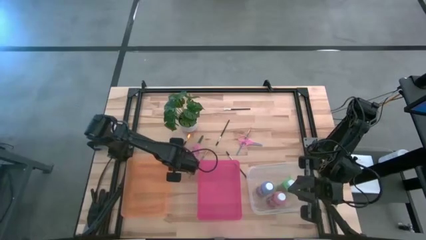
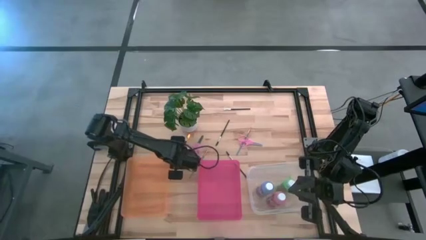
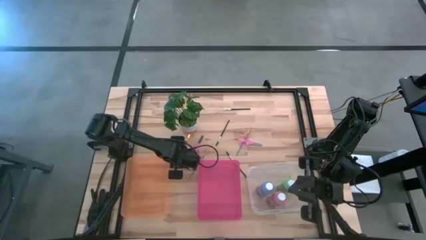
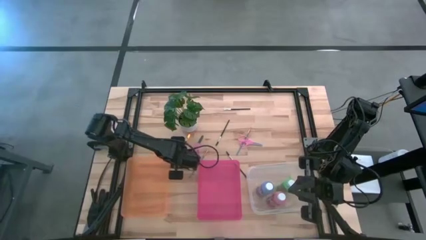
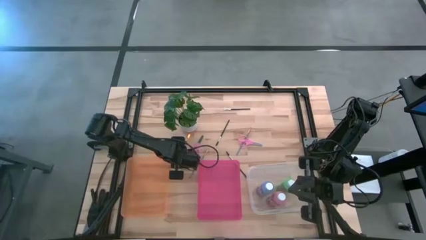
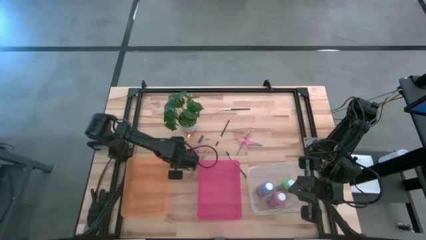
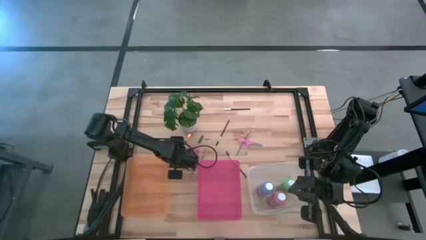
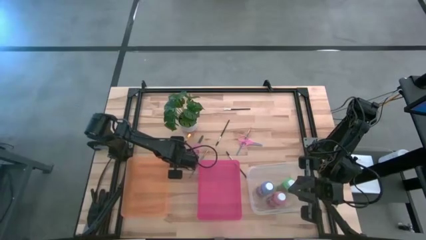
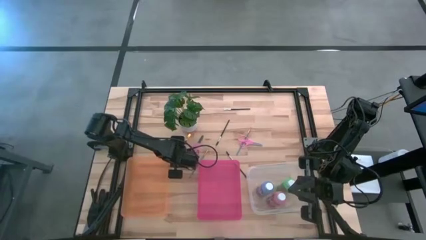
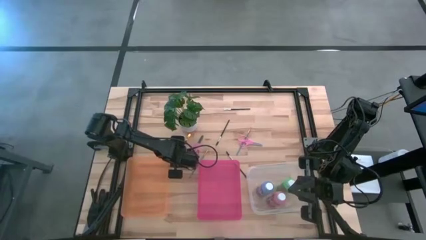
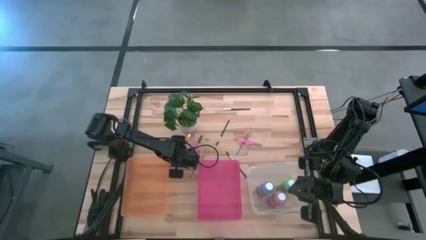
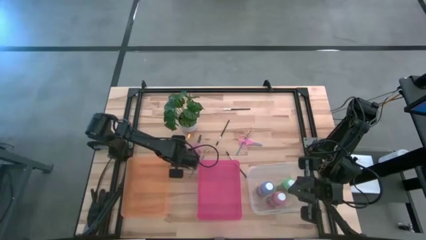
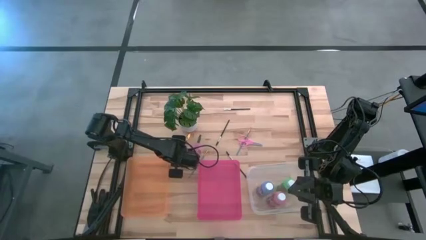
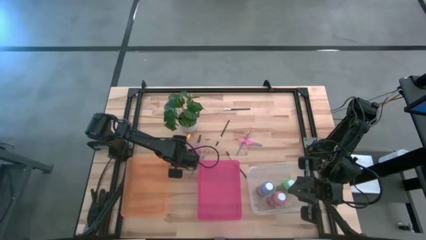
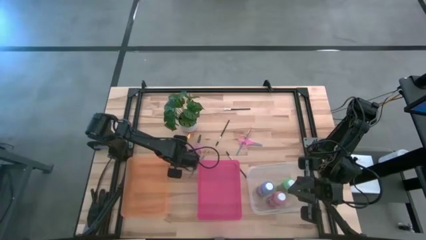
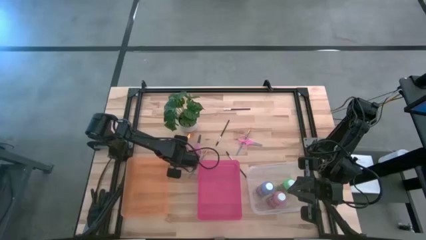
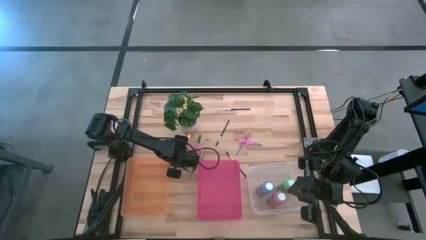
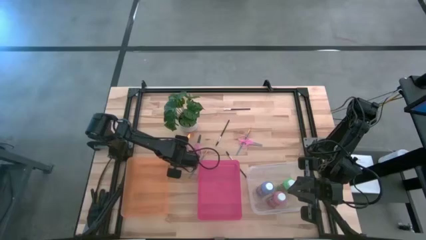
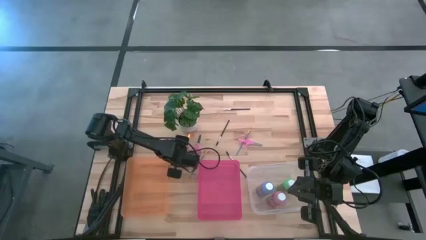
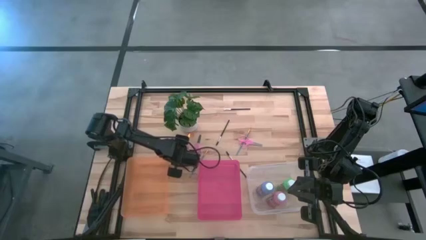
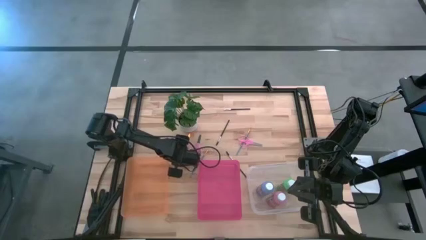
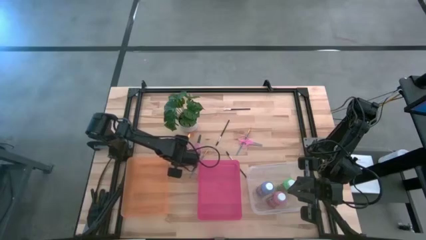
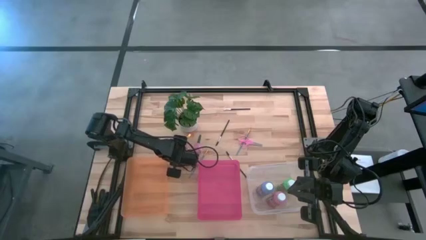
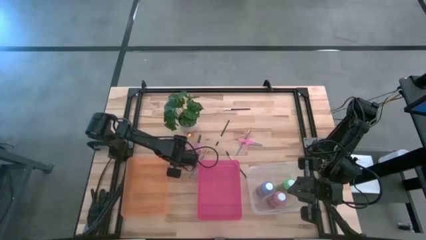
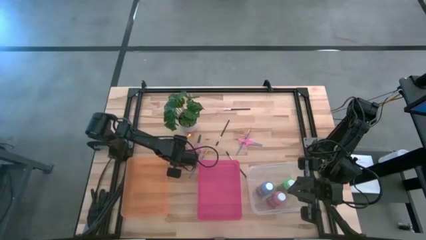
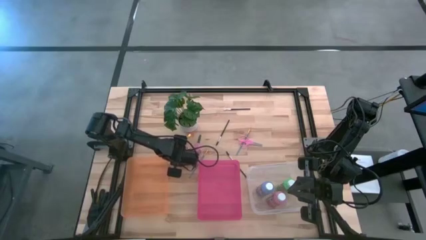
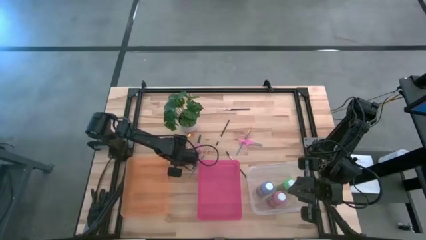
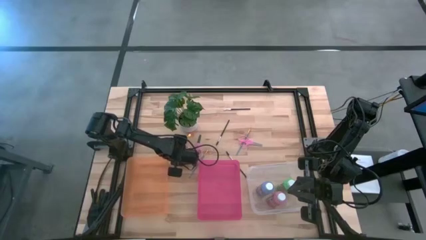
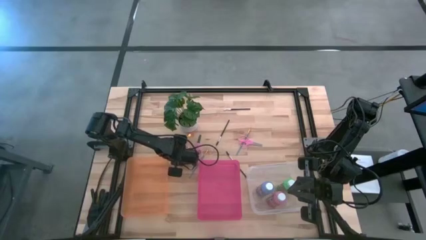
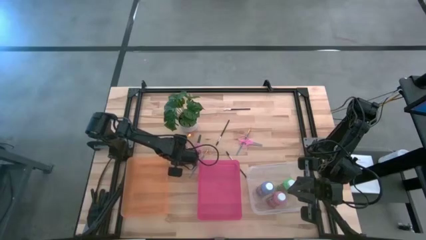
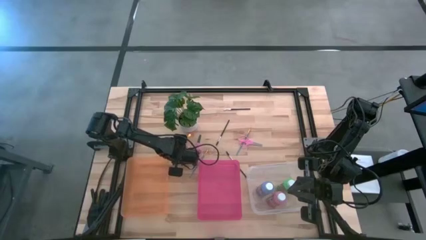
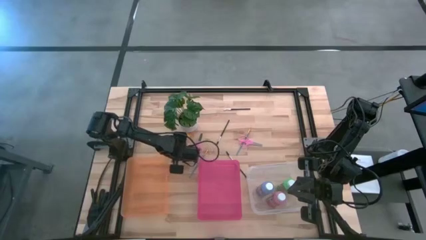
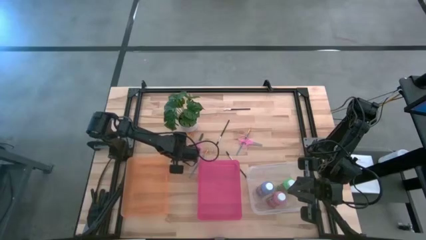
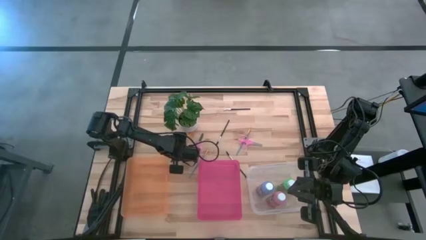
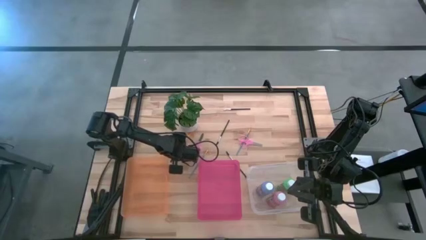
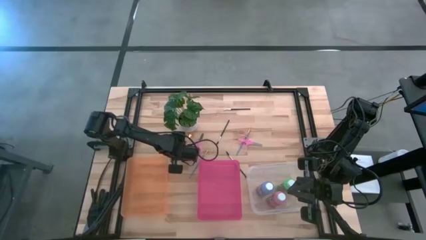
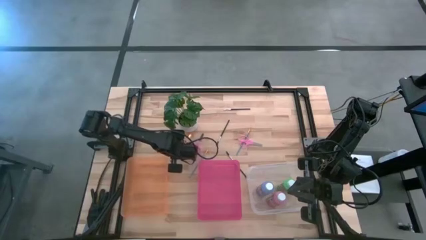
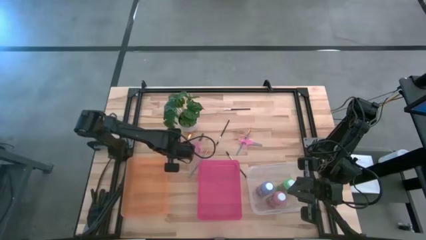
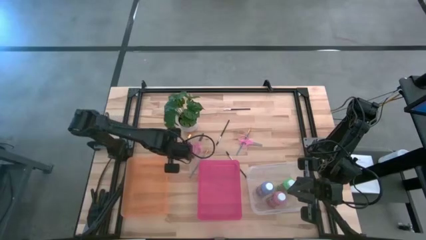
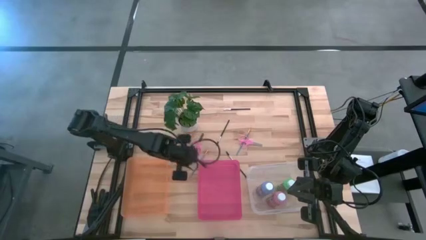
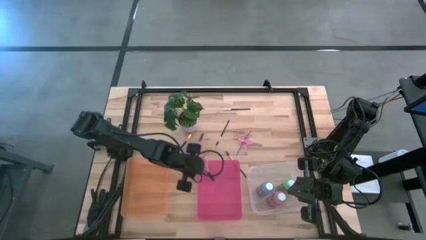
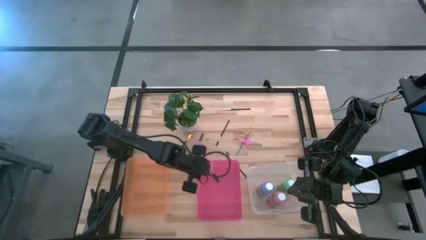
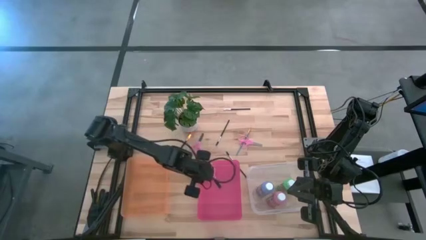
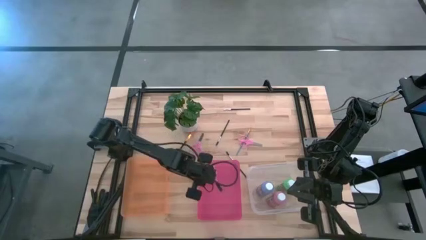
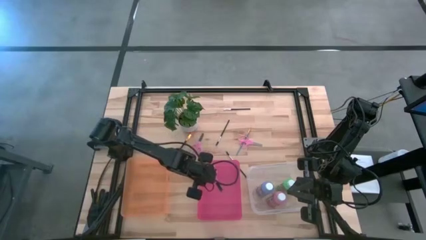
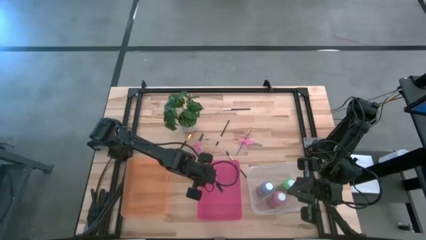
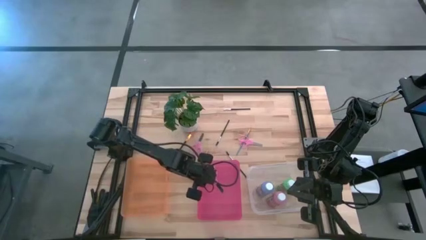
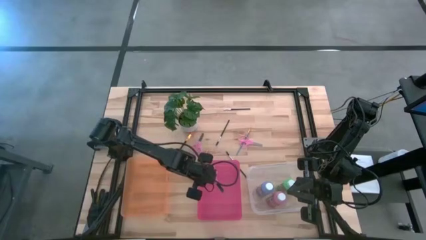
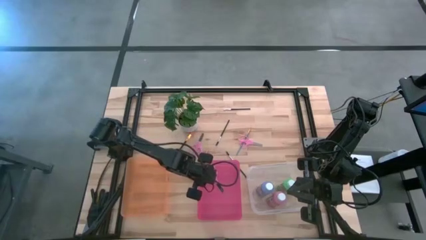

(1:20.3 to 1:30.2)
Task: Pick & Place Paint Supplies
Put the left pink scissors into the pink bin

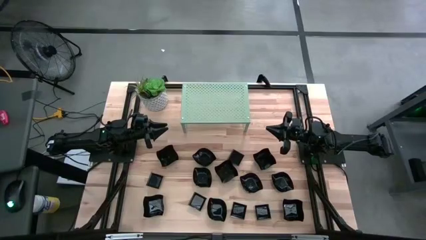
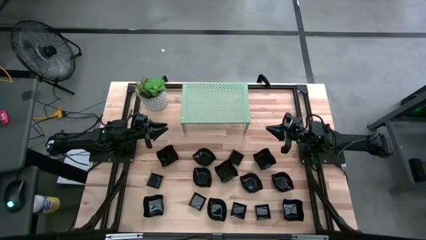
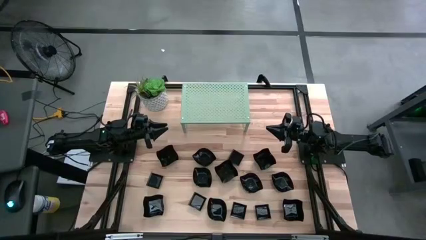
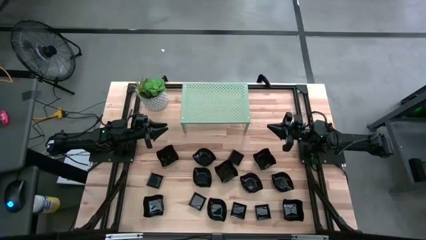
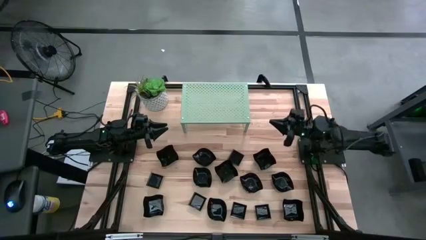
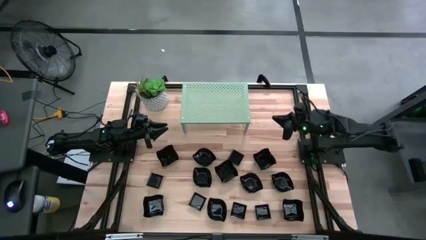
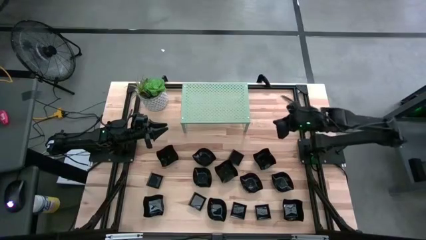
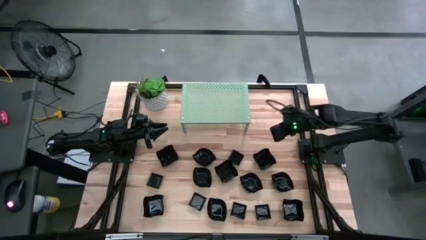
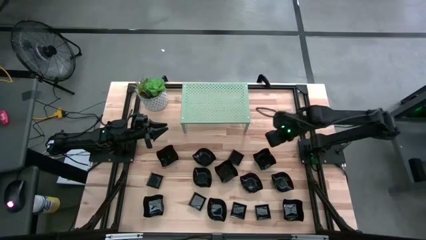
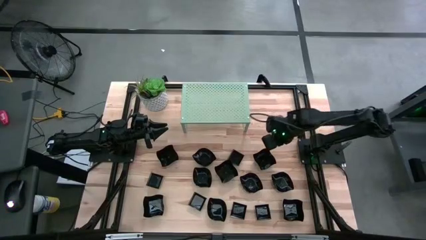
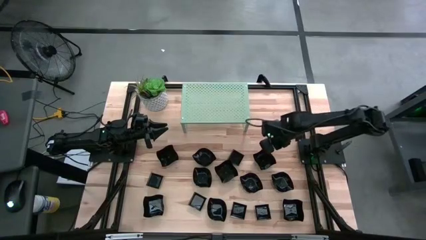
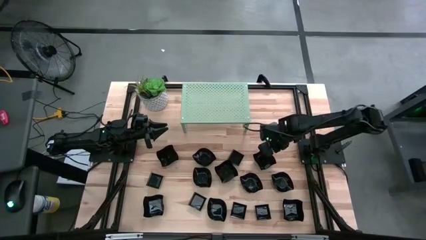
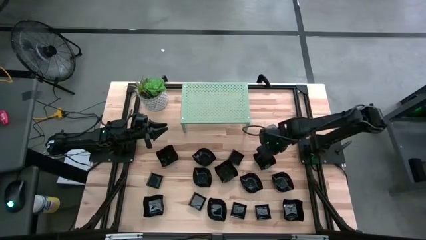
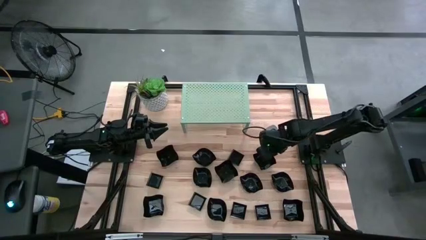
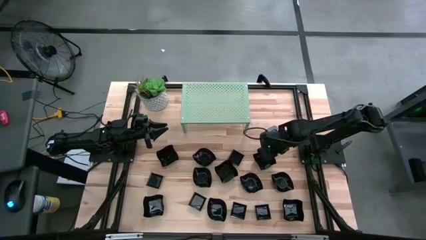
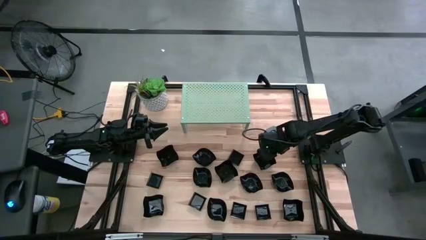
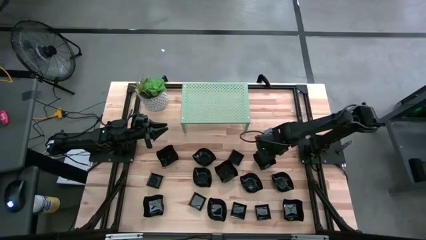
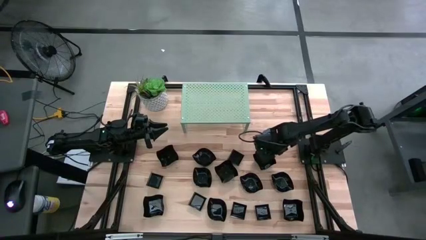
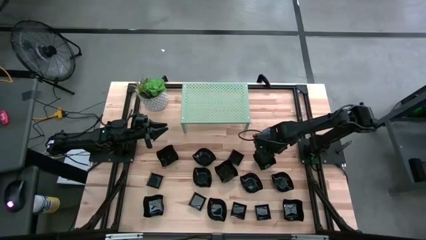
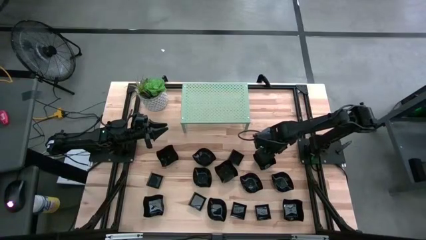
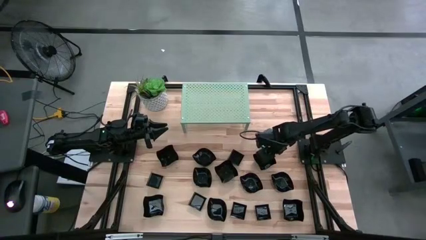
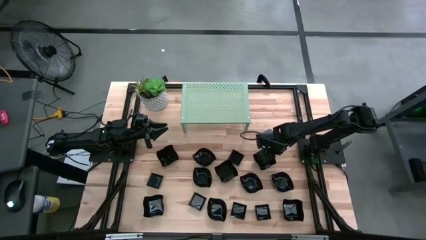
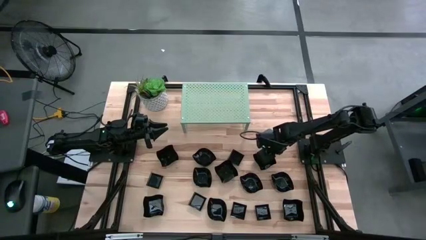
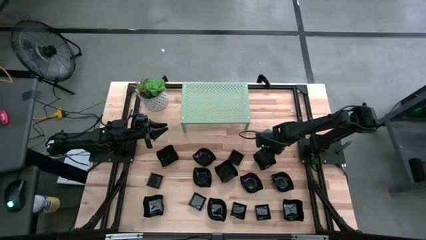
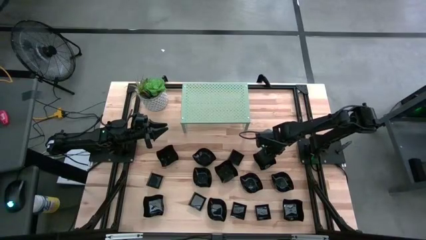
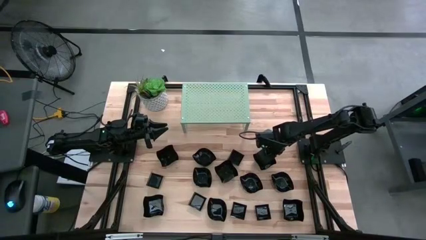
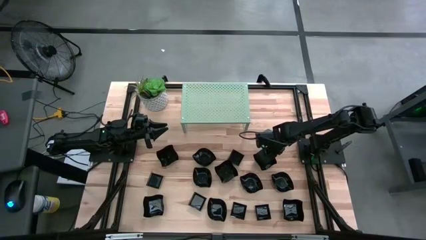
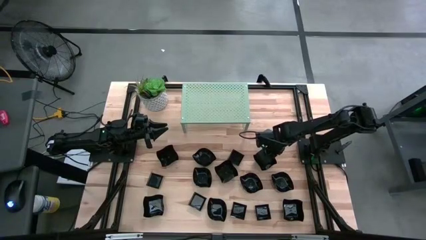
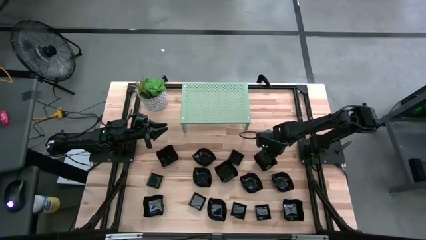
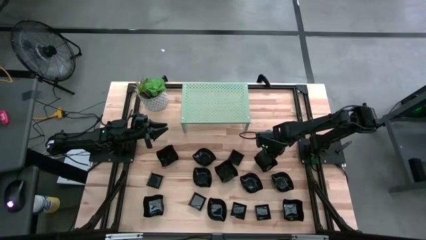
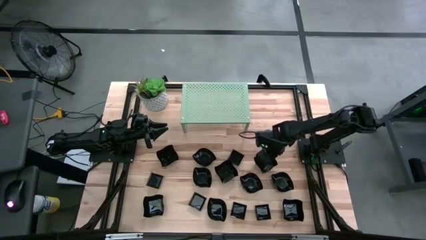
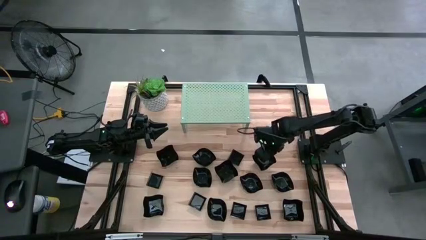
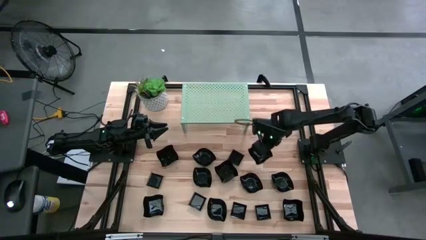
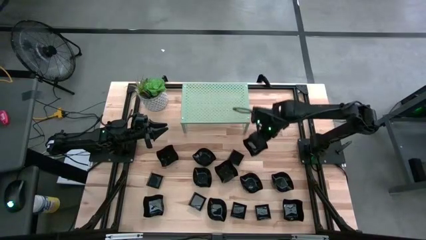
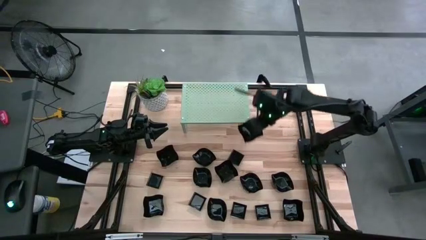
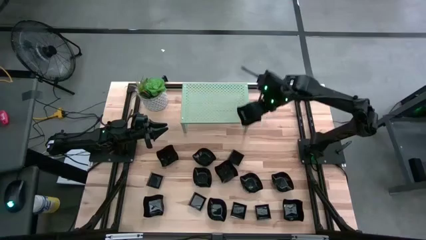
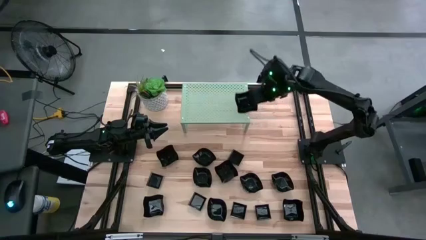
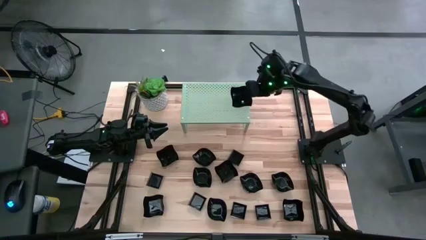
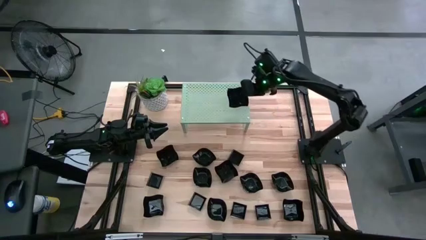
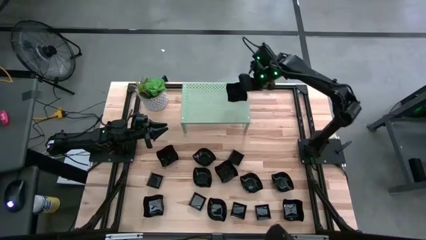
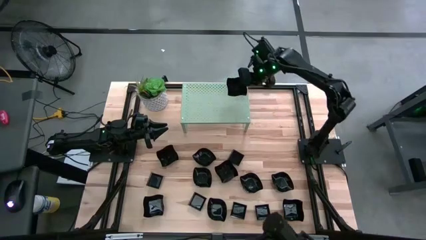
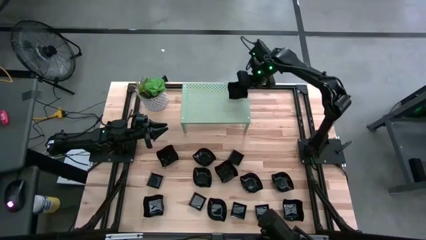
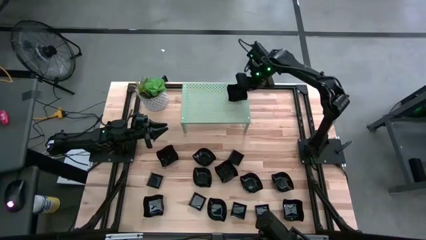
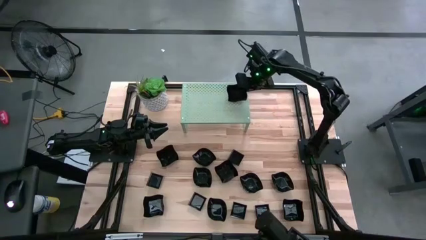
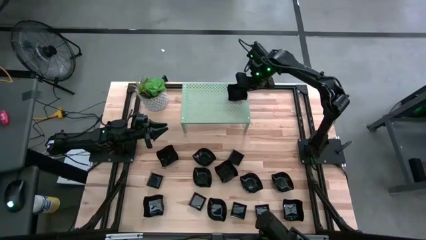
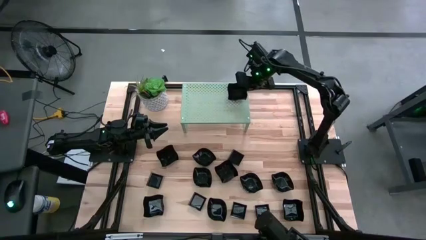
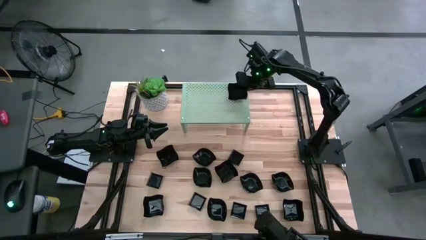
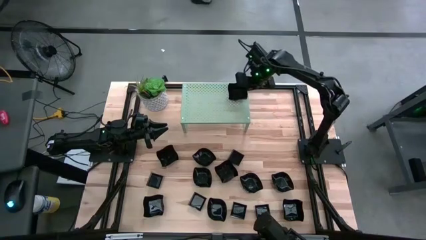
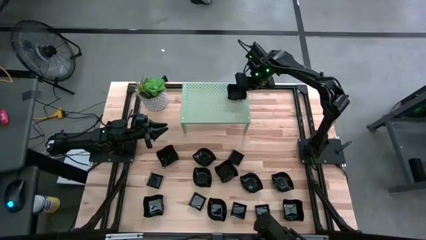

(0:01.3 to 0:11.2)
Task: Pick & Place Mini shaped plates
Put the distorted square plate on the shelf
